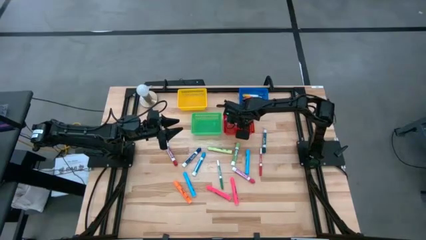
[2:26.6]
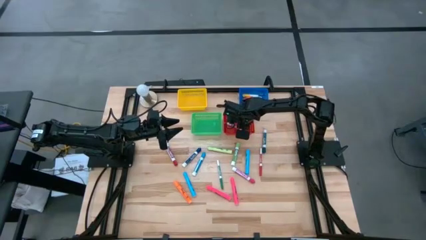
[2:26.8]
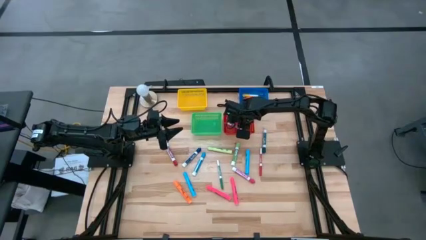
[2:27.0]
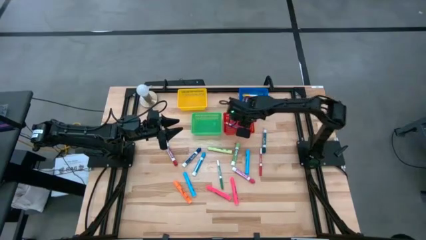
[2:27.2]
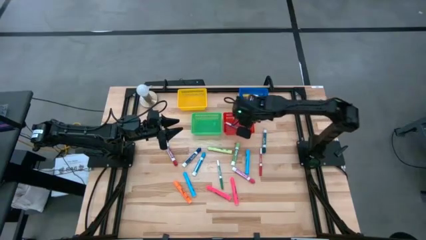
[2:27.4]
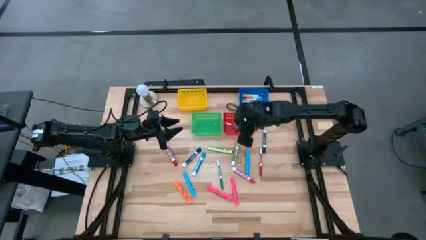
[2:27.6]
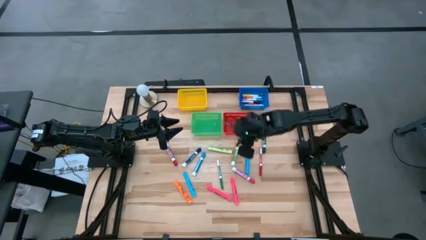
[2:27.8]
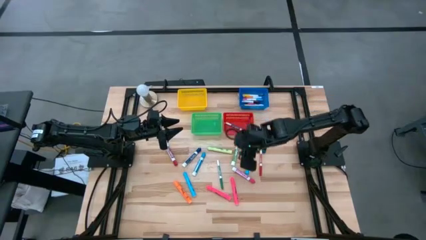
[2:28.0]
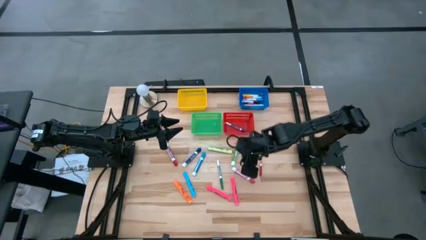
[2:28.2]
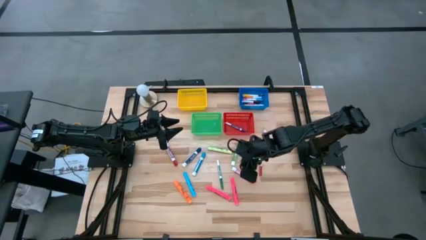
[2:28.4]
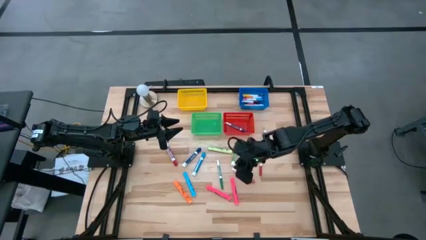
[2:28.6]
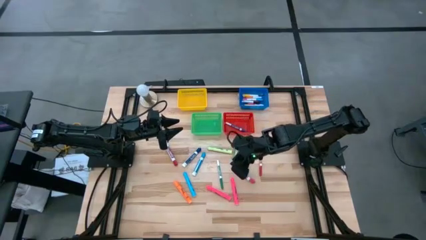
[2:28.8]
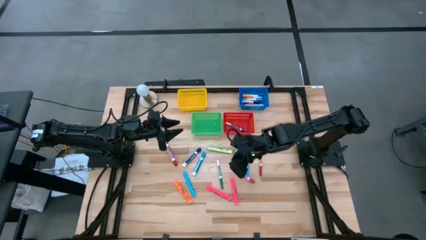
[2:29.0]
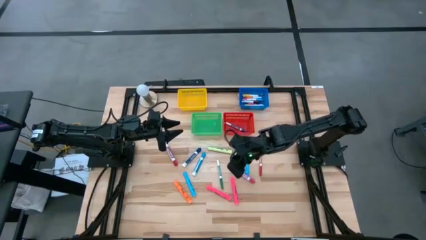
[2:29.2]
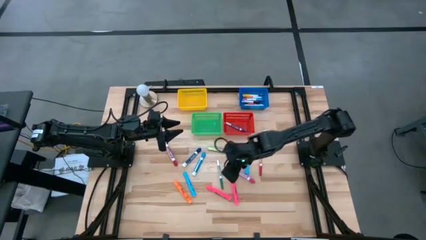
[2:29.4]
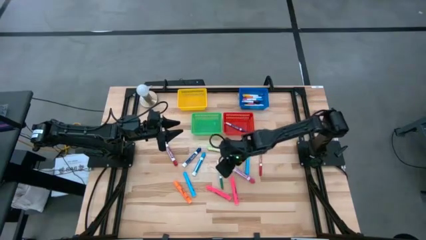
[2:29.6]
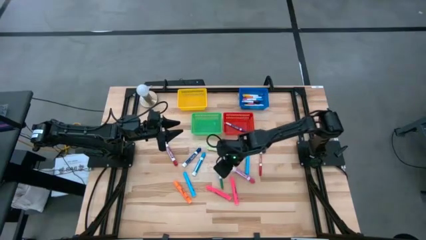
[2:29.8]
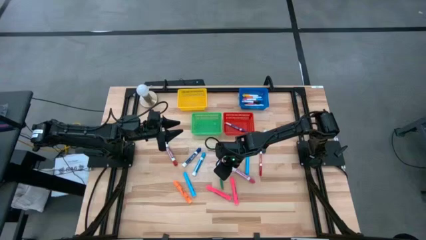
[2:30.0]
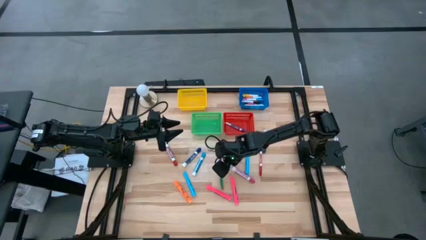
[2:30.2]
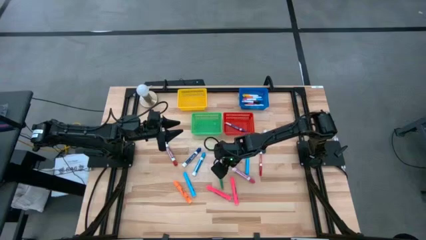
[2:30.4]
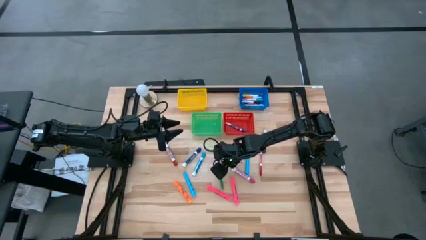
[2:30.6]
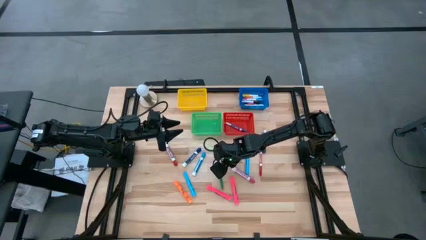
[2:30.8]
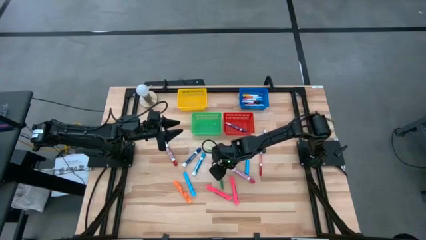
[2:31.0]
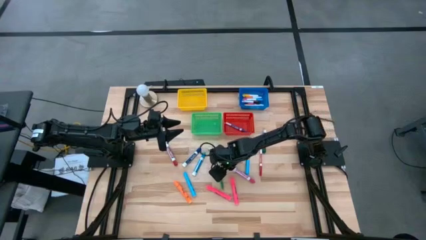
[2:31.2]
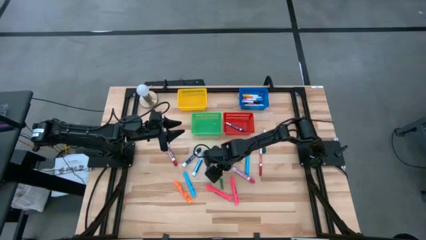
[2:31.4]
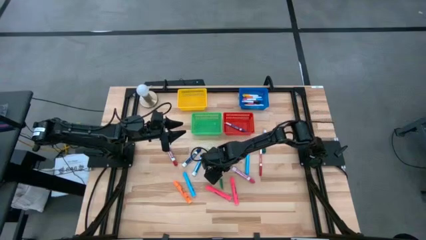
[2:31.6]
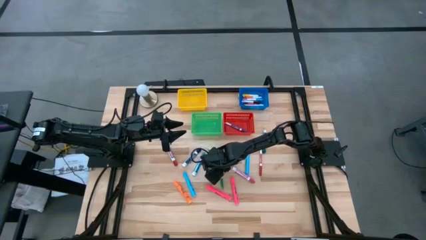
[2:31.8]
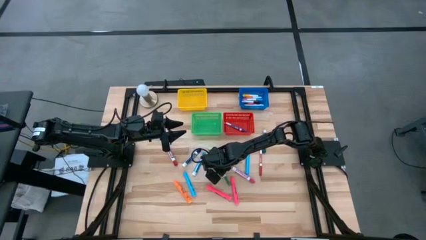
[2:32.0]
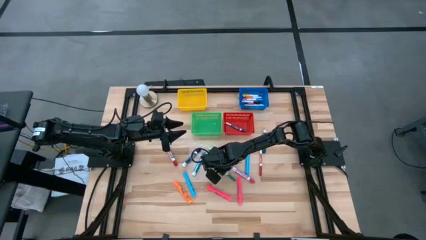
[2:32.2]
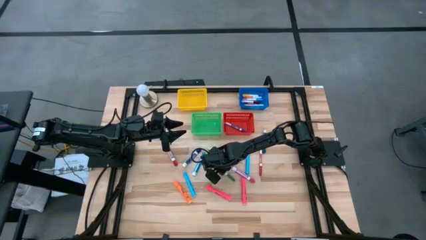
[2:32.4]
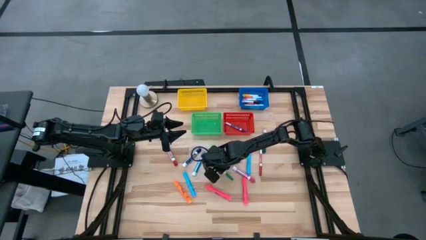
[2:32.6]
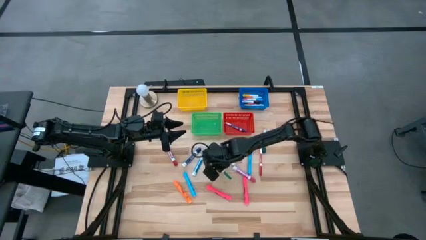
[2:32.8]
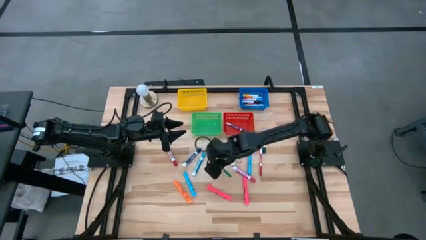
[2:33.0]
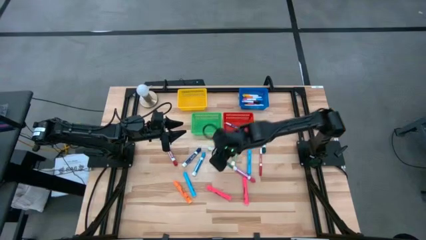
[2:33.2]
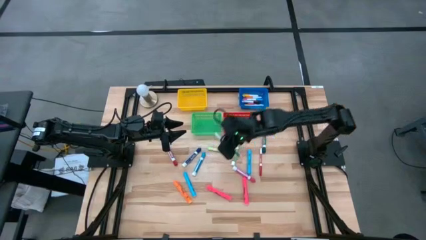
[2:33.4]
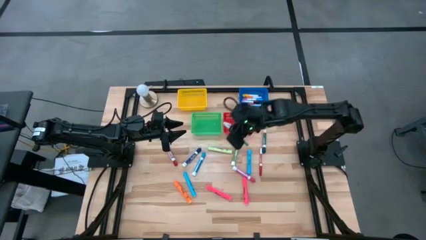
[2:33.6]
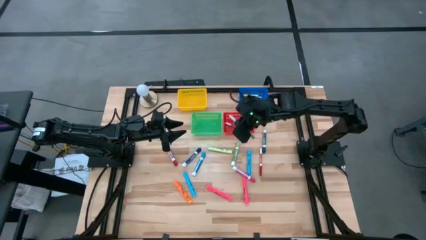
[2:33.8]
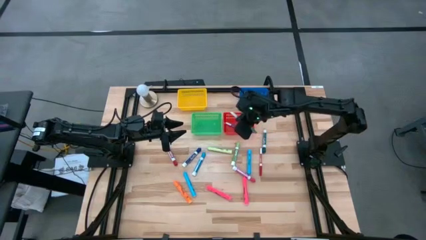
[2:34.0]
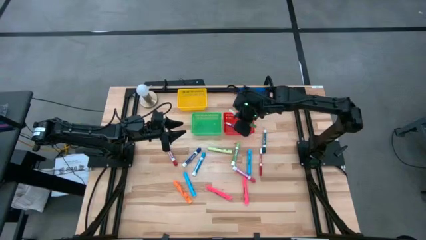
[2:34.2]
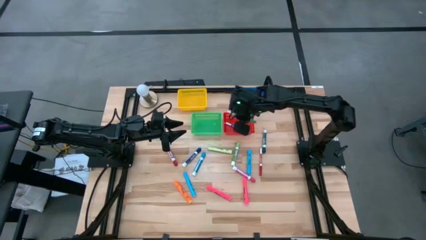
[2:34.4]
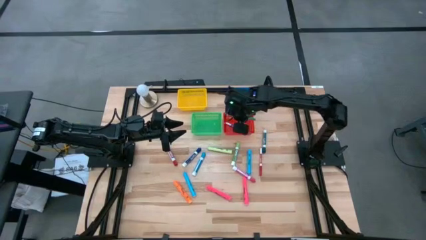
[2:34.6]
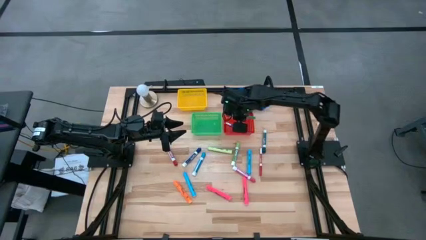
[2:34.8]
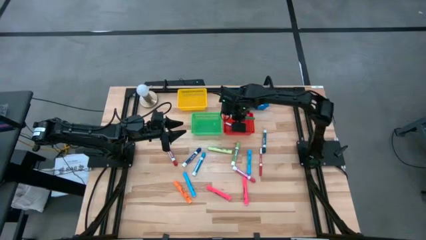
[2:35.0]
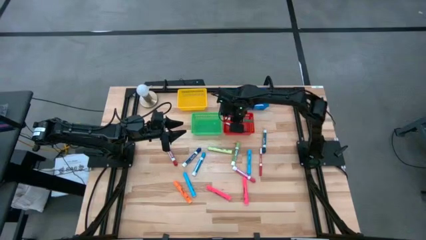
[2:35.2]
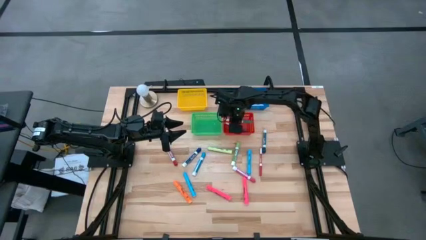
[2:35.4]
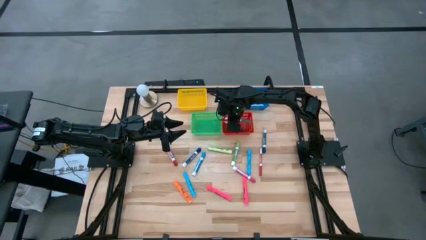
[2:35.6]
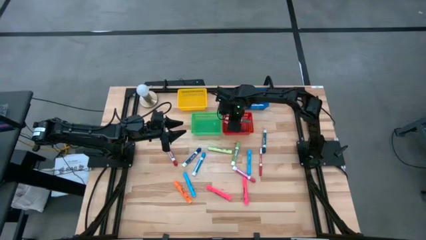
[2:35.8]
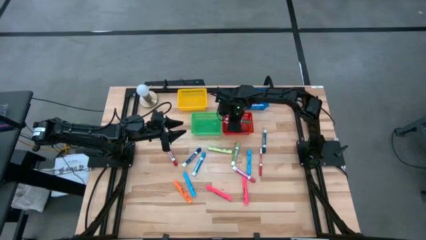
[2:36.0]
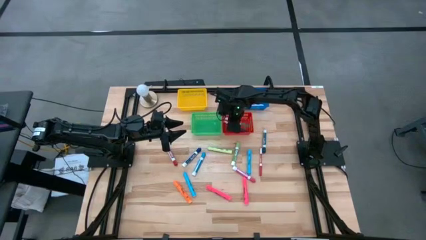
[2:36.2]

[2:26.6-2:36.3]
Task: Pick & Place Markers
Put the small green marker into the red bin

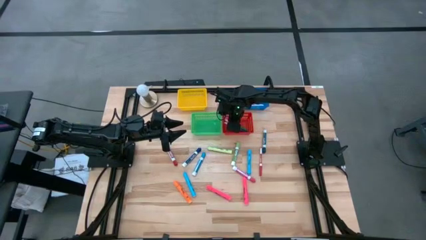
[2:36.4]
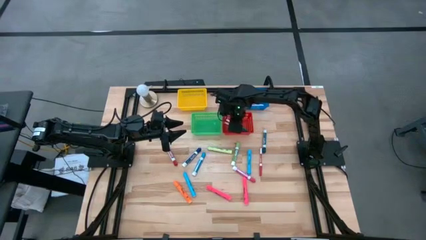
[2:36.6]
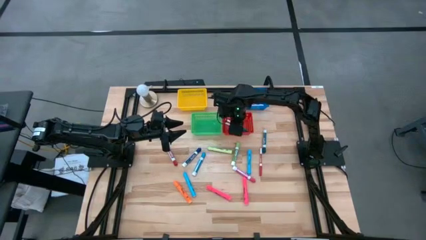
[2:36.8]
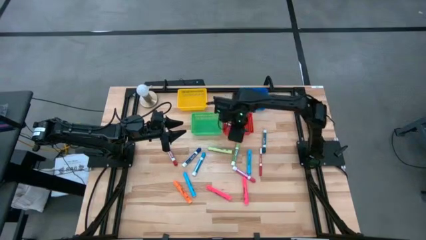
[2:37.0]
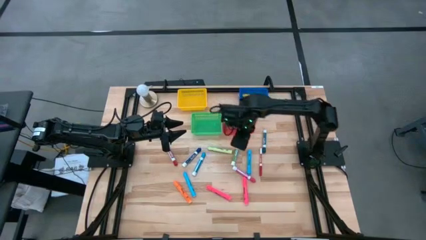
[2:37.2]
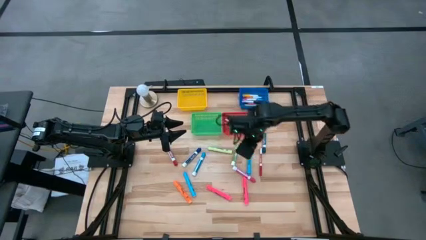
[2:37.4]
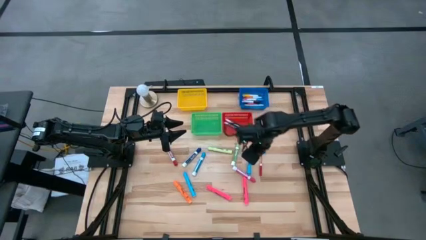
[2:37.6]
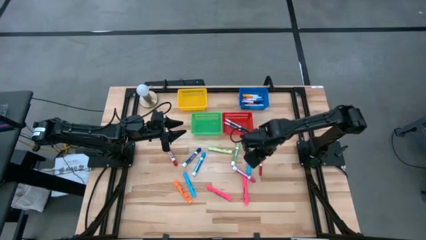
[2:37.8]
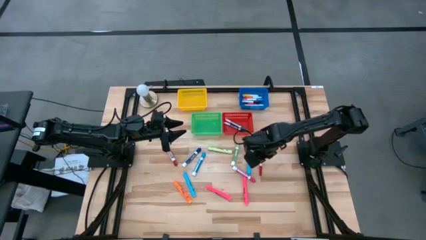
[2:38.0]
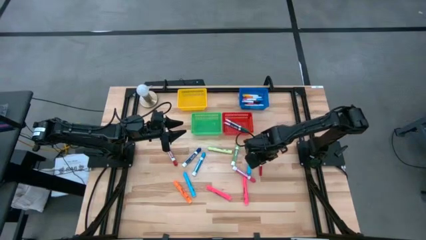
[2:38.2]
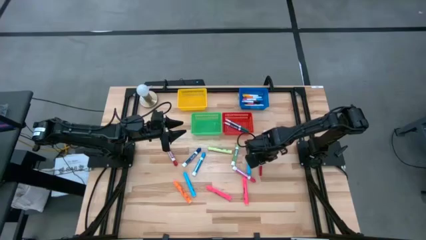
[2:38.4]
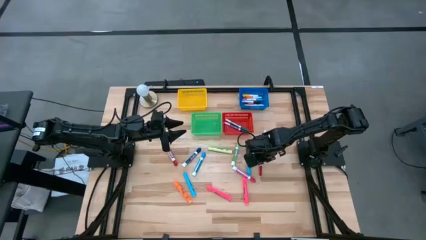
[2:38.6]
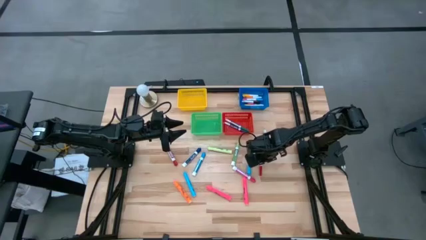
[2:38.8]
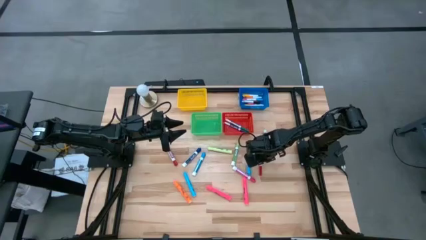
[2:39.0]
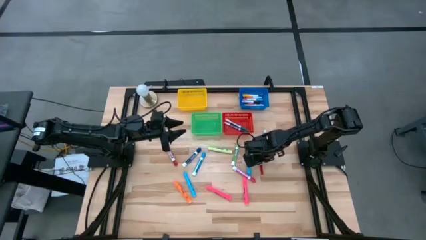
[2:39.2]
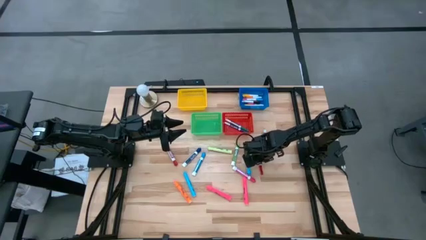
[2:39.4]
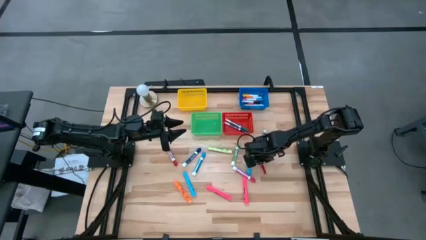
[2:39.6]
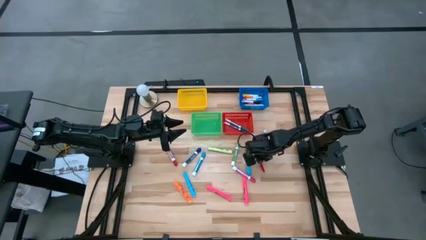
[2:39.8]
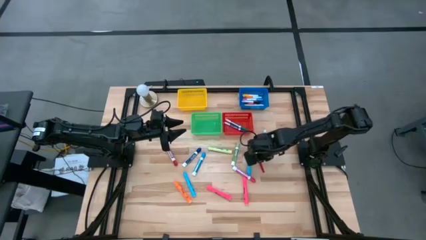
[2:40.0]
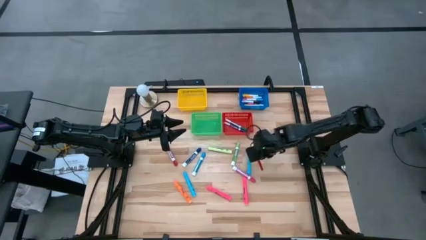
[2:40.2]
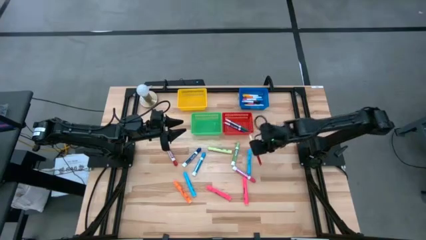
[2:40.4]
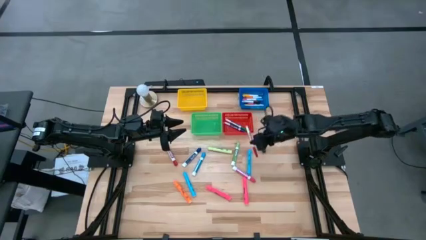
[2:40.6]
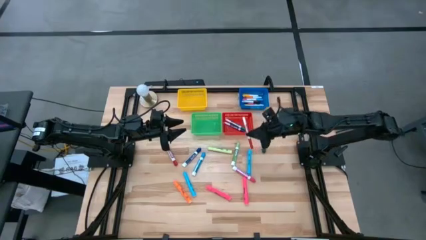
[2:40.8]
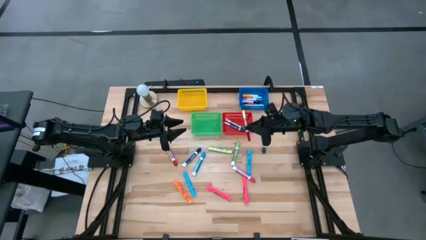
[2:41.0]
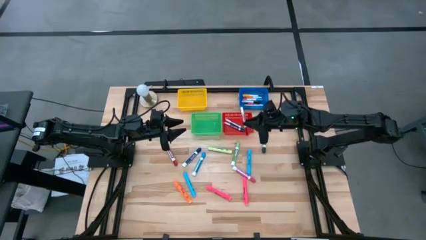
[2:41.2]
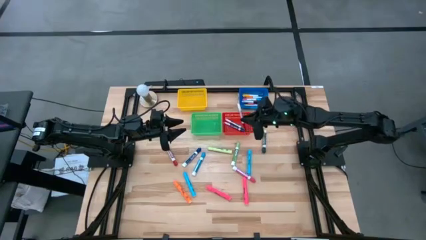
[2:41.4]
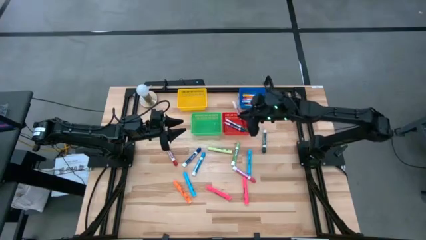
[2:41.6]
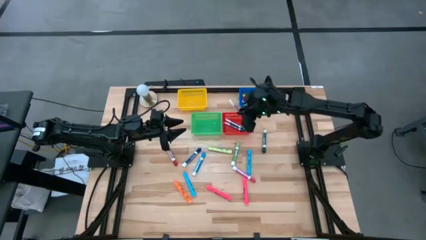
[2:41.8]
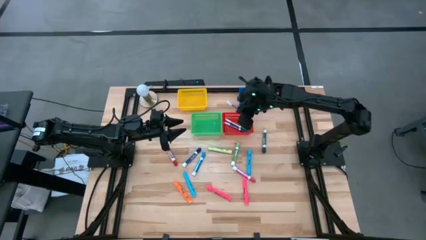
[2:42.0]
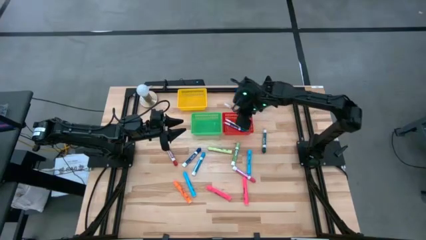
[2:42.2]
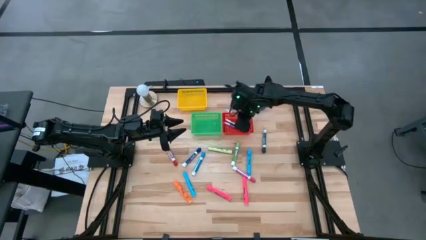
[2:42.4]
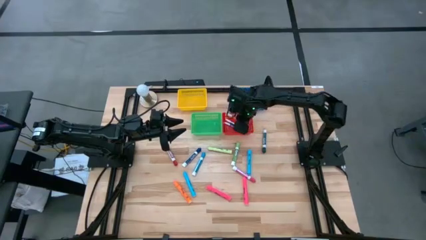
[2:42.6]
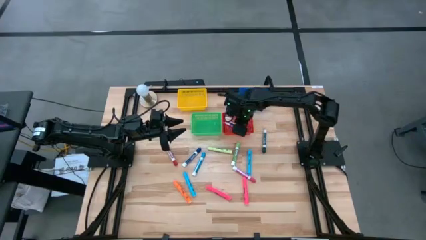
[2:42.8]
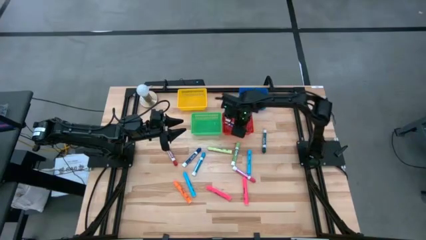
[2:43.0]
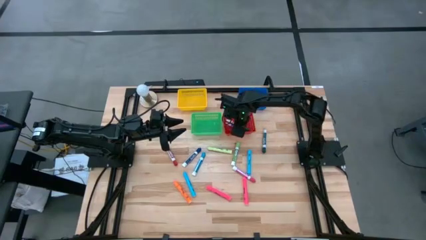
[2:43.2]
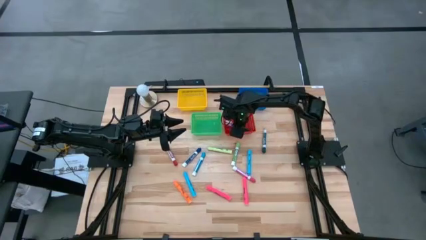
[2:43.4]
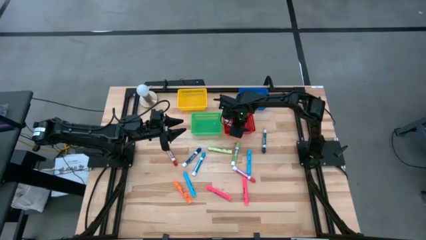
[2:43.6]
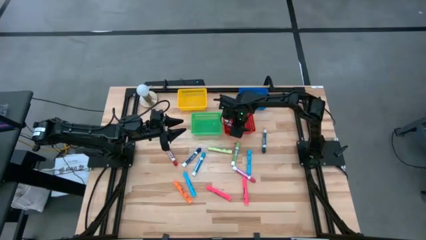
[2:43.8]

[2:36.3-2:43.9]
Put the small red marker into the red bin
